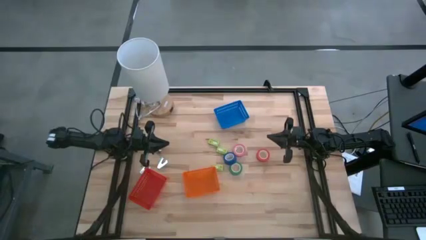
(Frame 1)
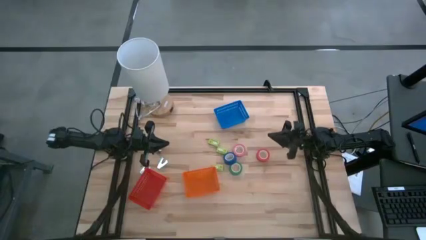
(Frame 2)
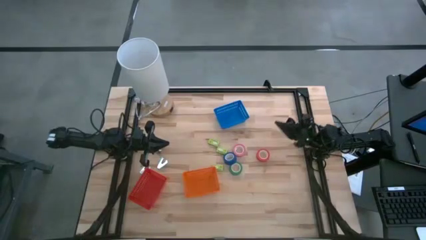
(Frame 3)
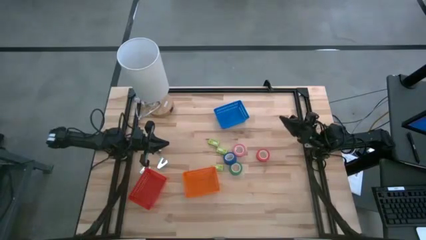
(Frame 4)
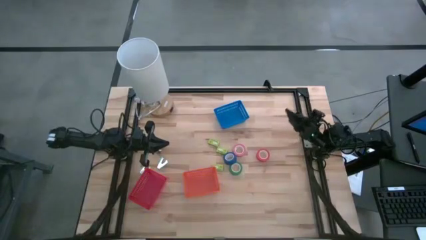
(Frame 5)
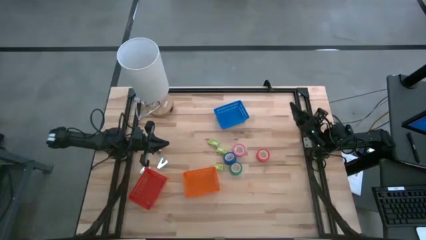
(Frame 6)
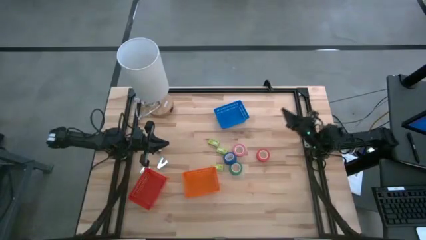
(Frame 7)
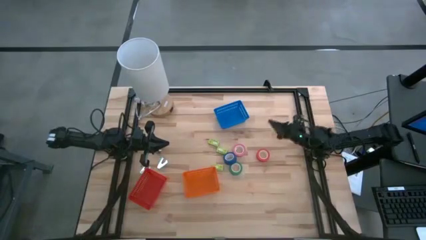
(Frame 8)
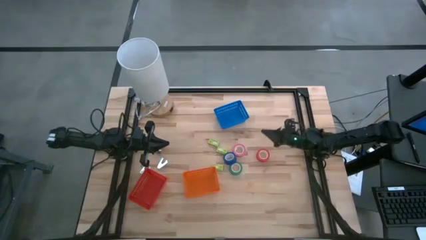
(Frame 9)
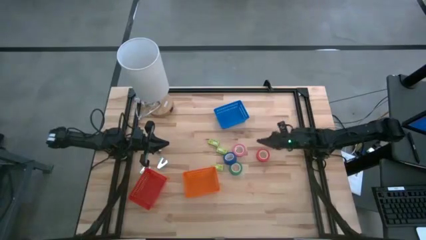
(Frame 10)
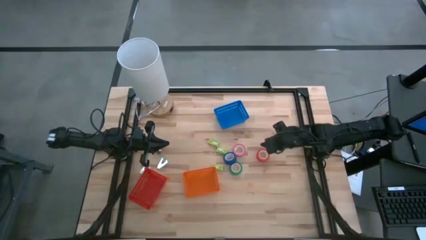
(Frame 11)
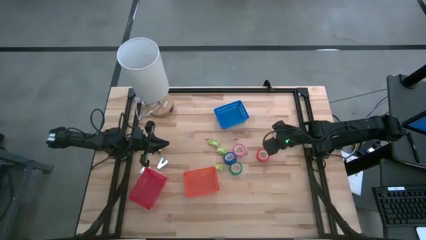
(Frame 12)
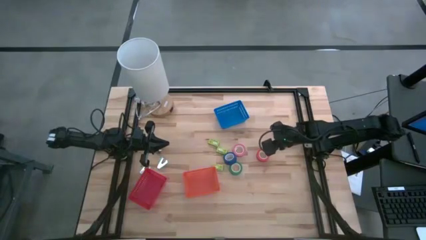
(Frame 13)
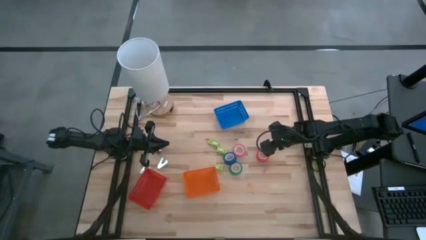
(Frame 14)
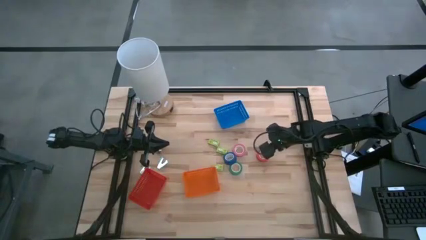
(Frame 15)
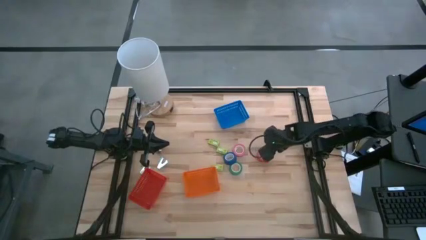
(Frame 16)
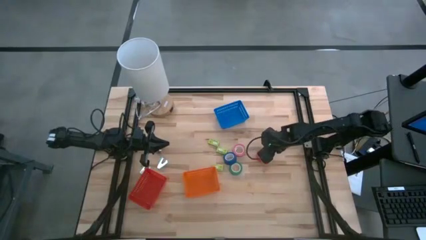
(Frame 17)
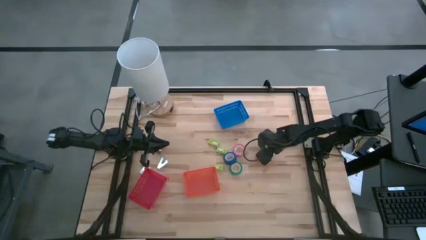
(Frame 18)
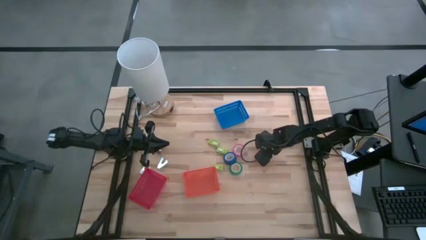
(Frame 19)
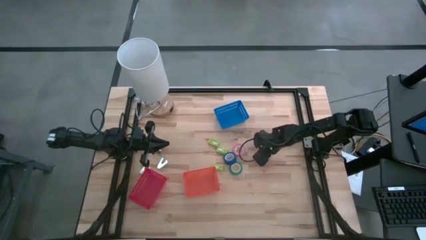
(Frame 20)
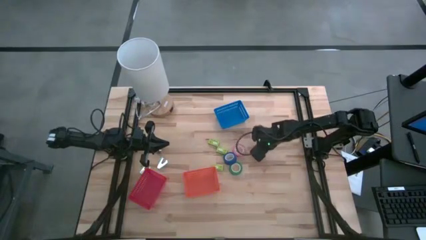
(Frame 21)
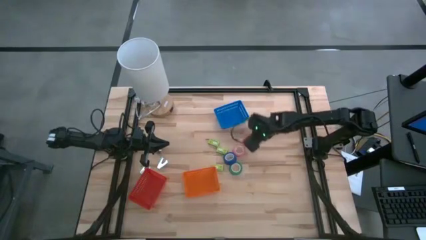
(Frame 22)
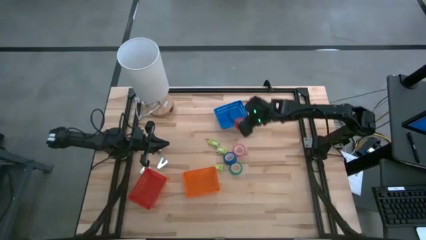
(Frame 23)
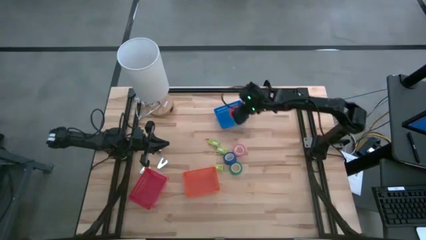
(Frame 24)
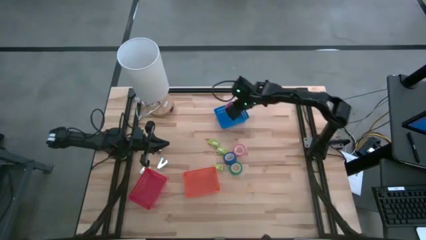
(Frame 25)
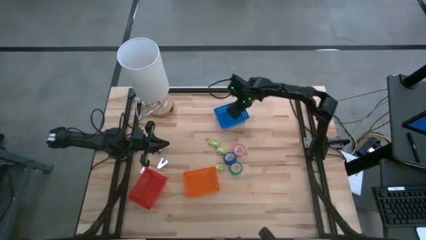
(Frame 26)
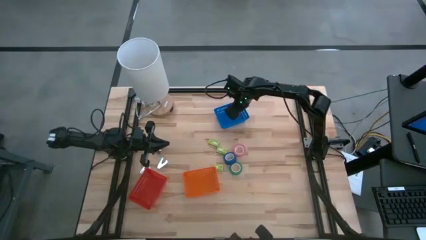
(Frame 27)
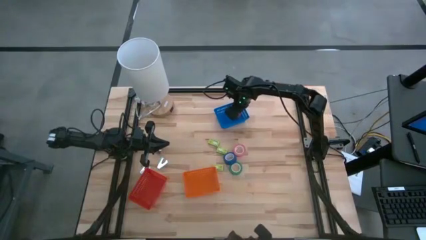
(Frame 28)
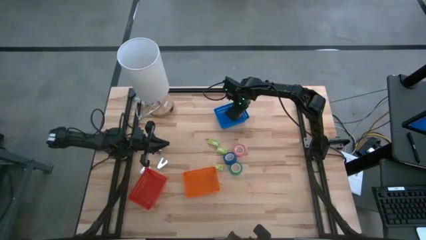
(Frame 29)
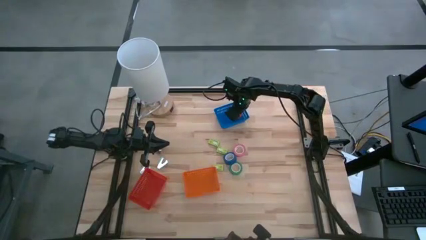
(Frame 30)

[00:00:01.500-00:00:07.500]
Task: Pick and place Stapler, Stapler remover, tape
Put the orange tape into the blue bin

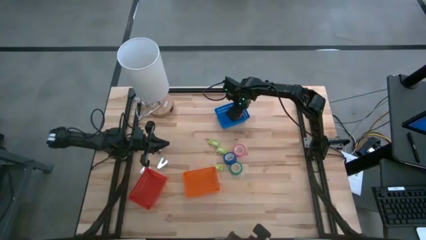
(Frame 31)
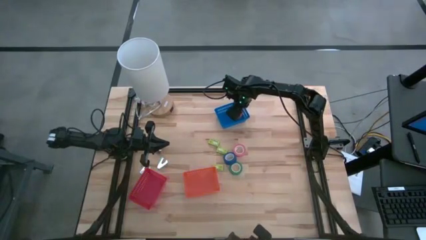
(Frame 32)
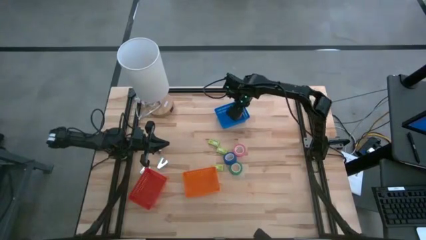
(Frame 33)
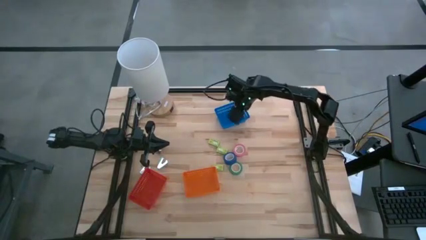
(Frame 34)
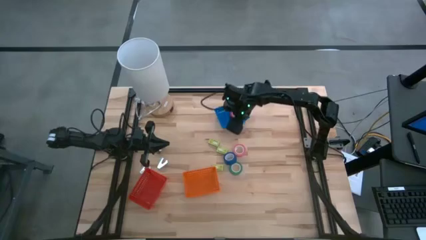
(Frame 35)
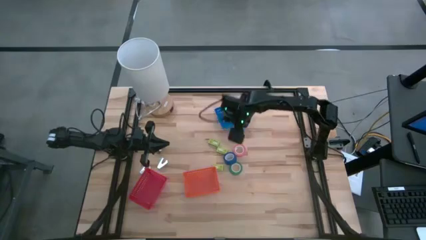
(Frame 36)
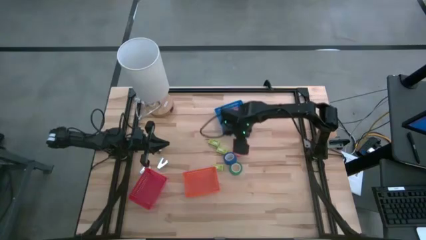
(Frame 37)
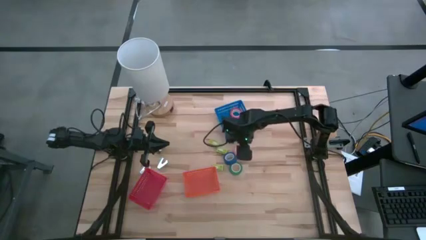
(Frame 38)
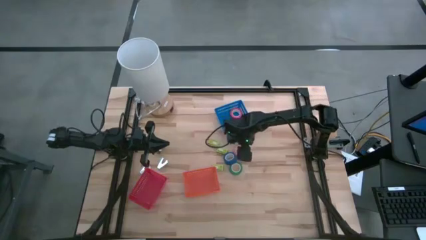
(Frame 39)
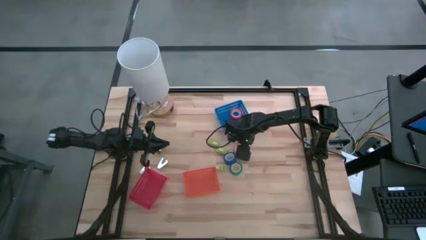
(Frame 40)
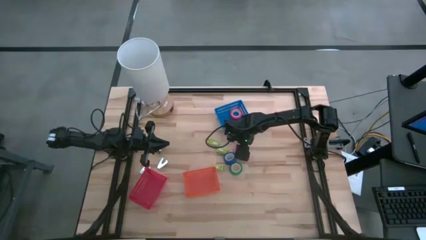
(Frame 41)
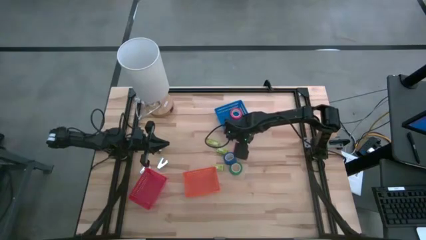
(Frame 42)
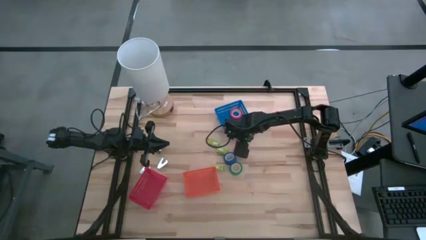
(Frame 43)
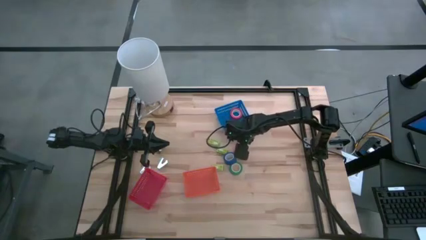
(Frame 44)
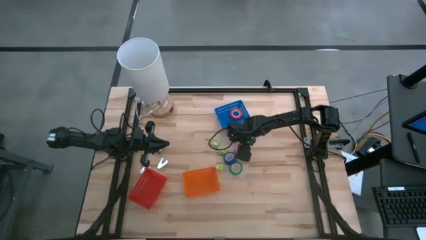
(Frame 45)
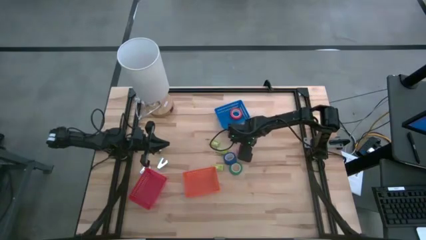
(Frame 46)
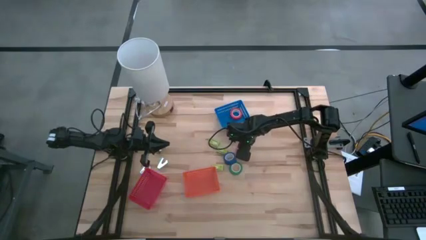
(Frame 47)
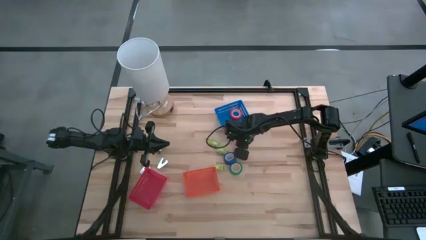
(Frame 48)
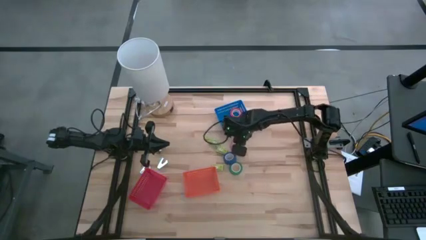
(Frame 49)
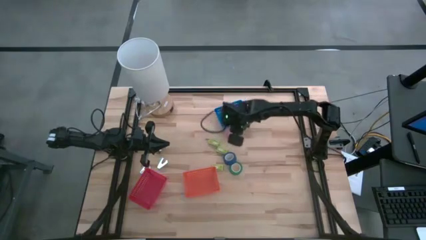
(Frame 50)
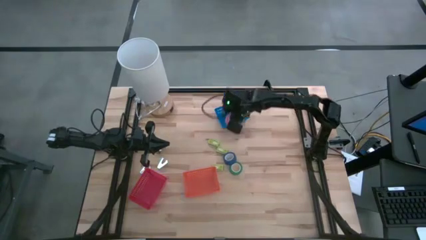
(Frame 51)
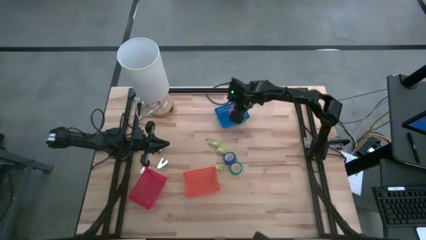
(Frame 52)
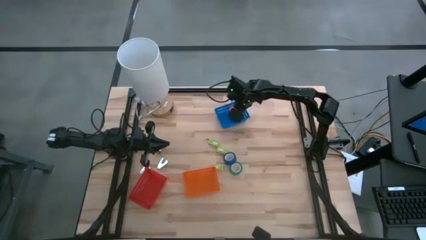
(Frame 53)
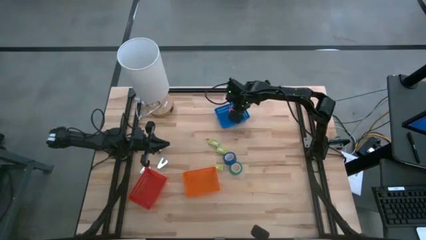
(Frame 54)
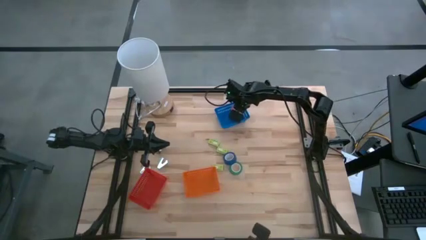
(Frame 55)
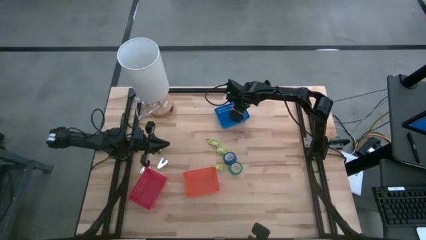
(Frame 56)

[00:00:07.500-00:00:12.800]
Put the pink tape into the blue bin

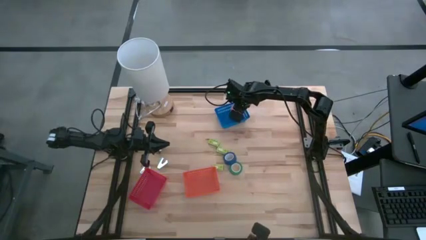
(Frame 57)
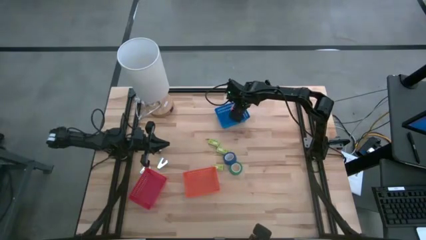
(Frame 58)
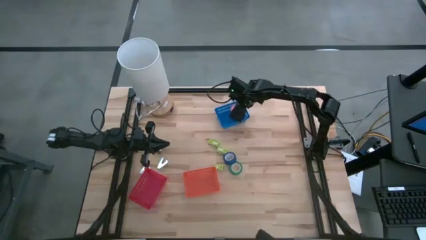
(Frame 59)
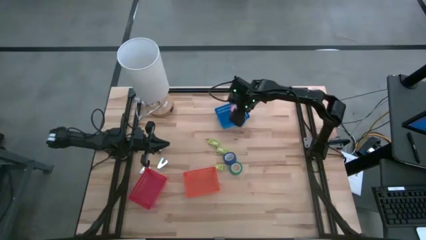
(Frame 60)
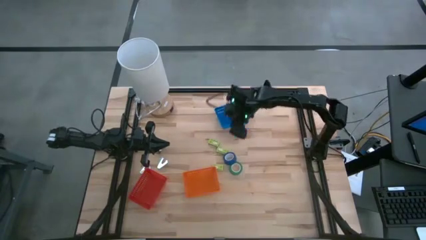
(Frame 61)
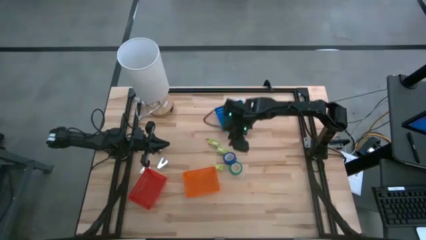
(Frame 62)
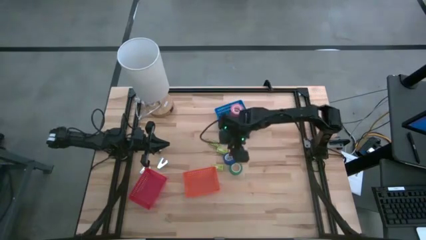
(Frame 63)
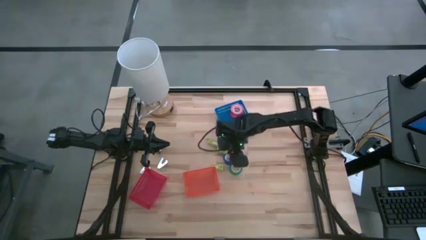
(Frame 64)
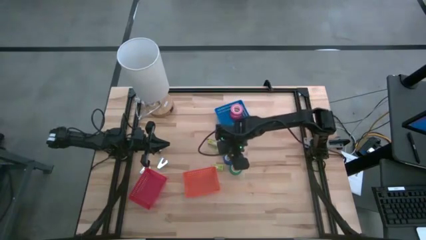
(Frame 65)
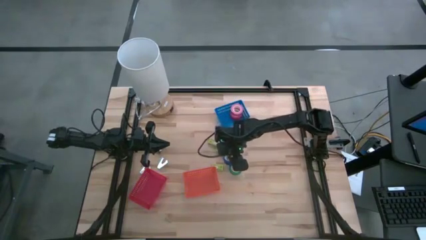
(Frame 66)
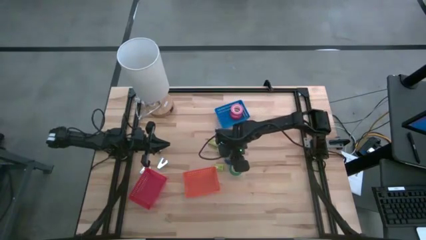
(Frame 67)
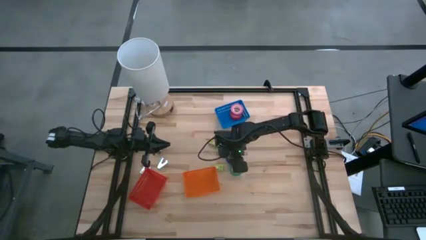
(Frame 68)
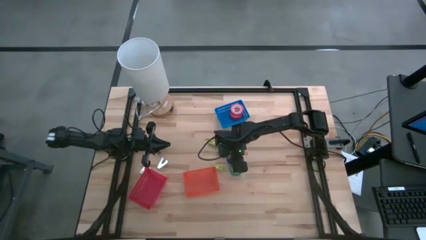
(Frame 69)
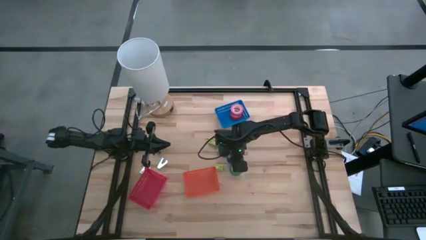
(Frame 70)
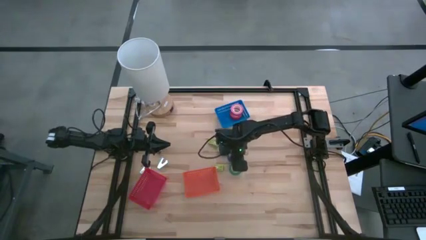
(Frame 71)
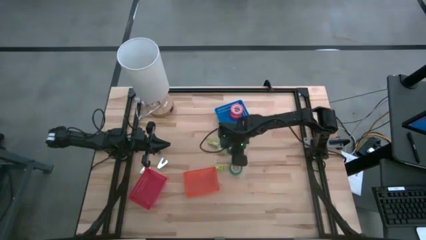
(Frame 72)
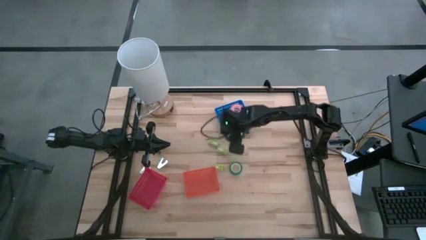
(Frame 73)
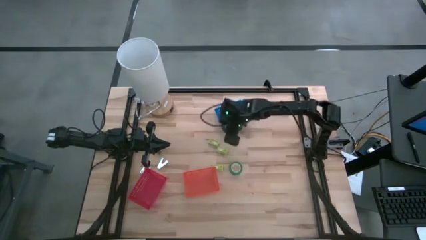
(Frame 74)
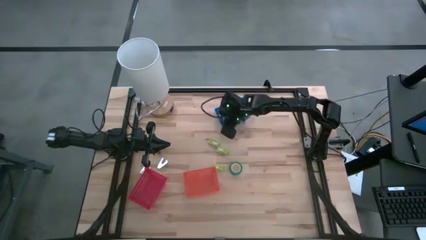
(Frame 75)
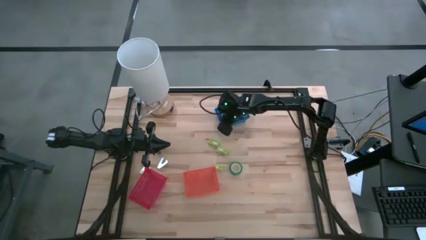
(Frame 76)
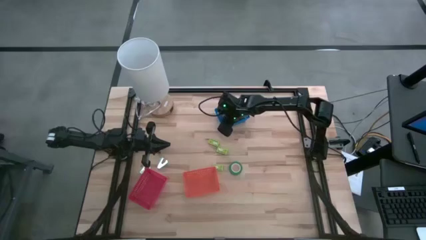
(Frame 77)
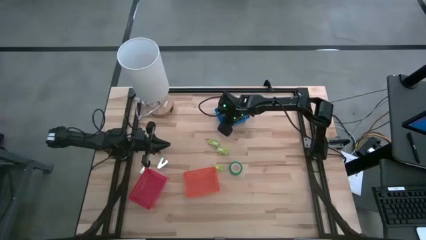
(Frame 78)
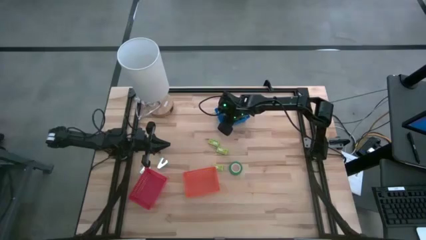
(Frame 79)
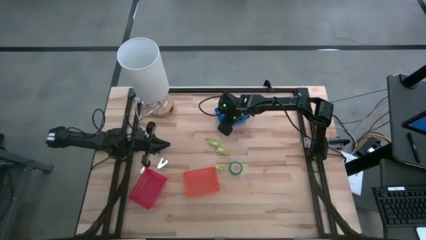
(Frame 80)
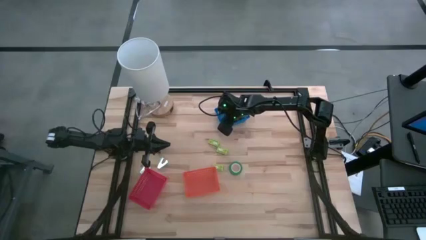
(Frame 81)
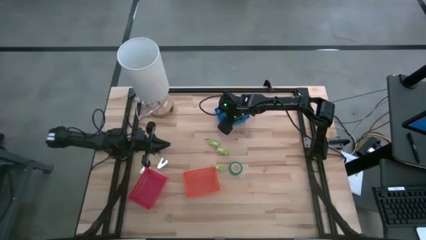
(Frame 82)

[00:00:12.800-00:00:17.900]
Put the blue tape into the blue bin
